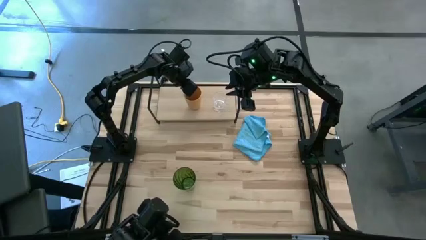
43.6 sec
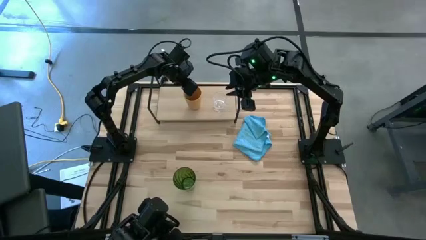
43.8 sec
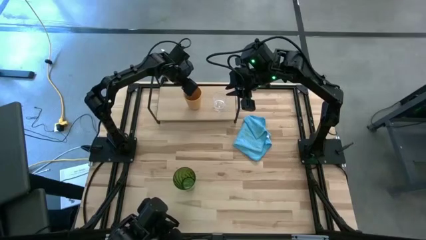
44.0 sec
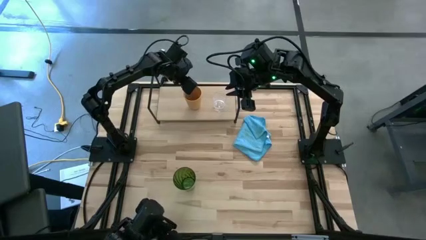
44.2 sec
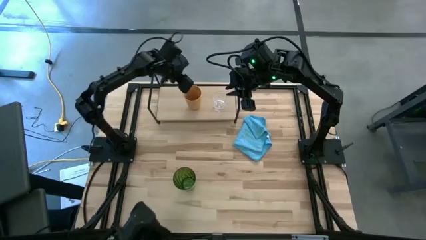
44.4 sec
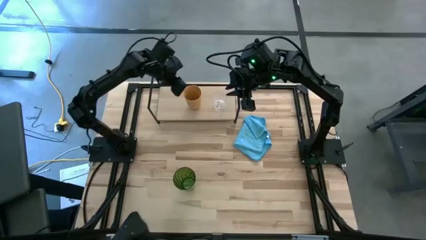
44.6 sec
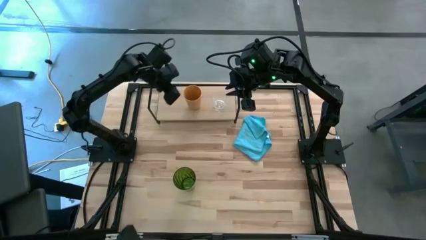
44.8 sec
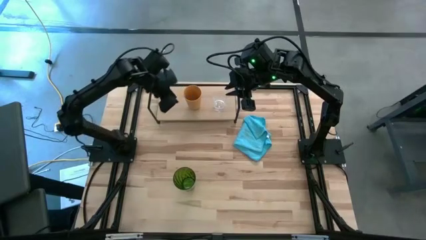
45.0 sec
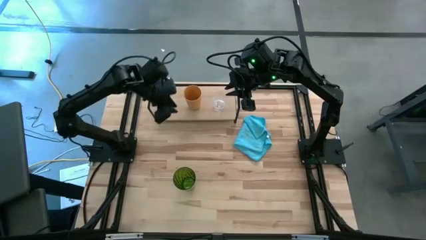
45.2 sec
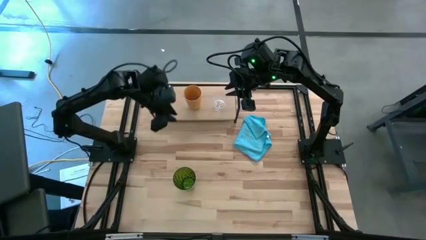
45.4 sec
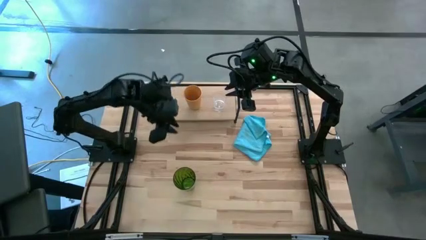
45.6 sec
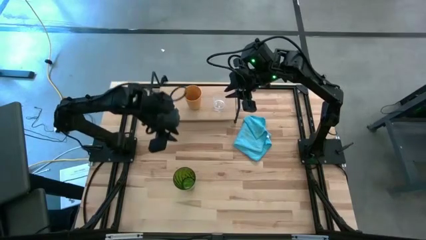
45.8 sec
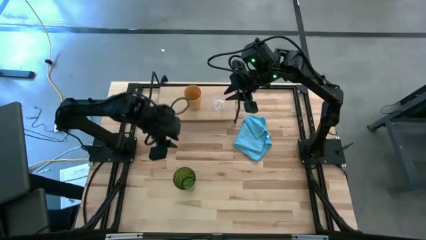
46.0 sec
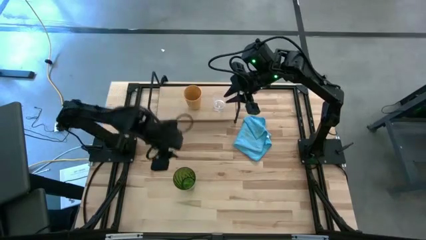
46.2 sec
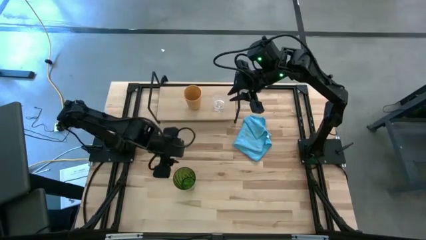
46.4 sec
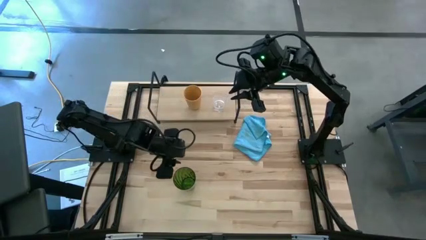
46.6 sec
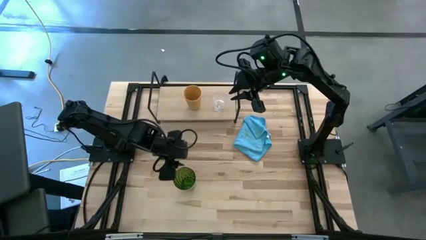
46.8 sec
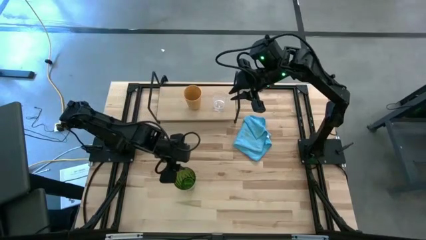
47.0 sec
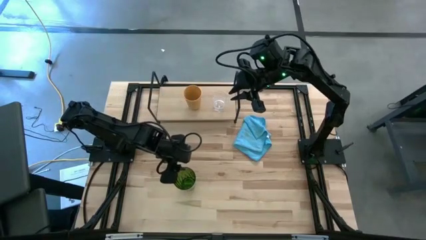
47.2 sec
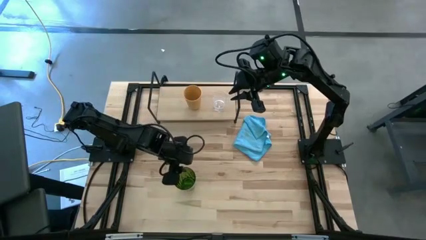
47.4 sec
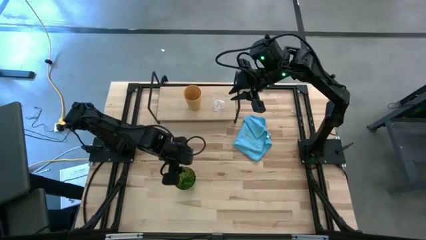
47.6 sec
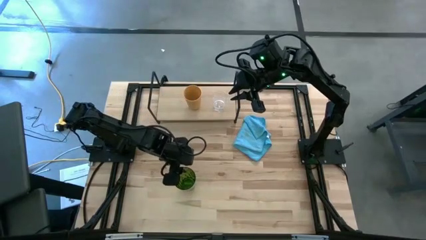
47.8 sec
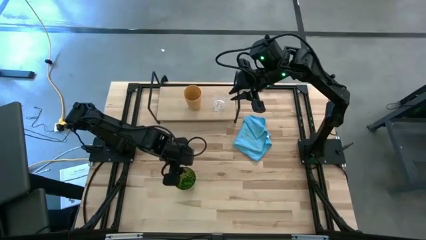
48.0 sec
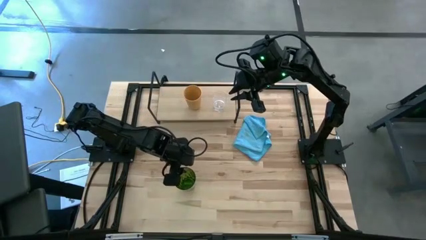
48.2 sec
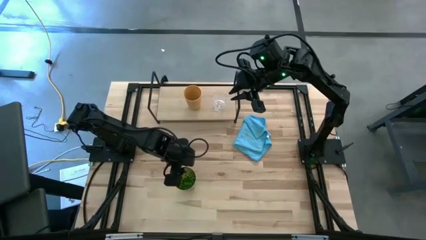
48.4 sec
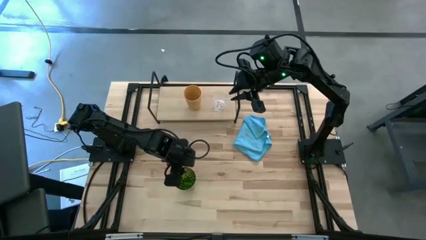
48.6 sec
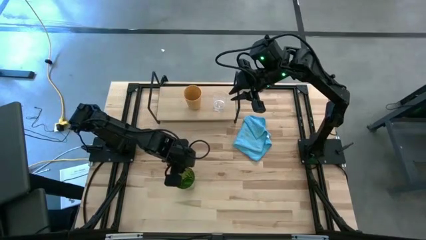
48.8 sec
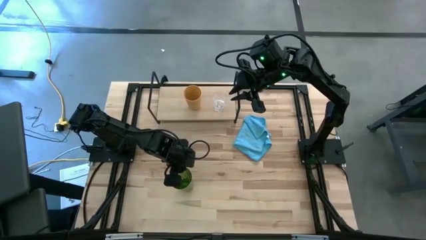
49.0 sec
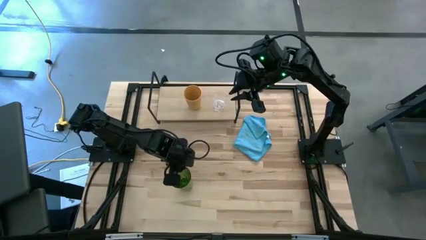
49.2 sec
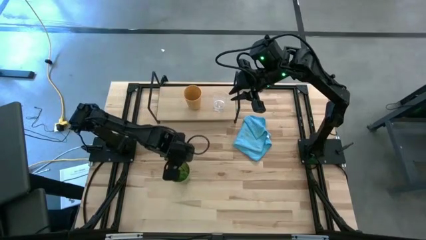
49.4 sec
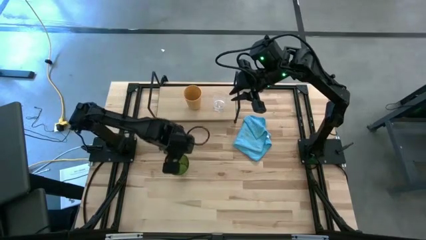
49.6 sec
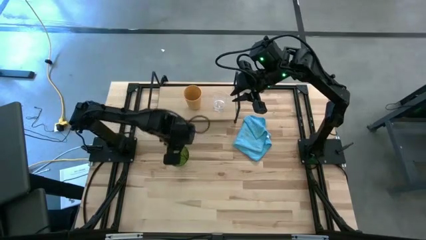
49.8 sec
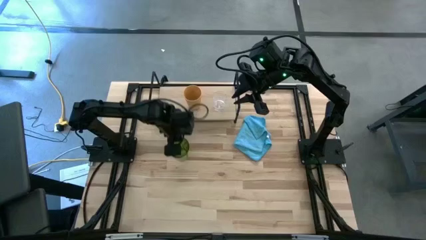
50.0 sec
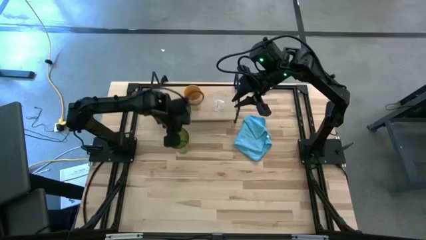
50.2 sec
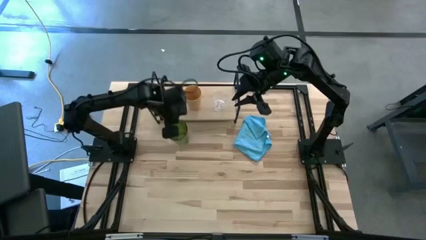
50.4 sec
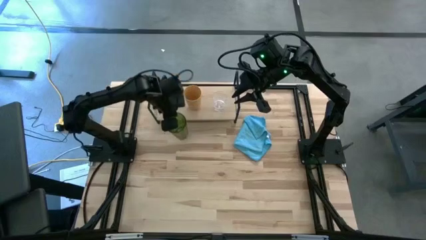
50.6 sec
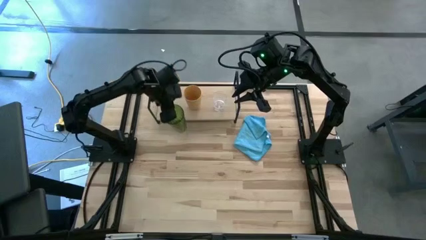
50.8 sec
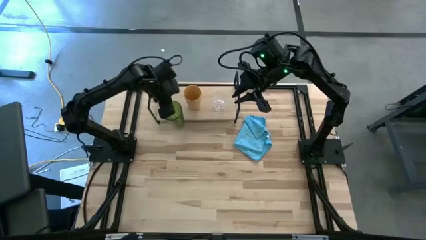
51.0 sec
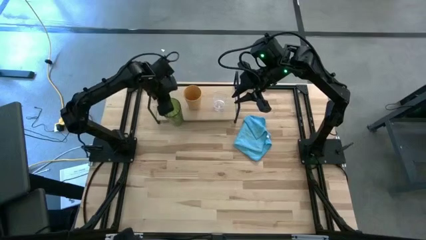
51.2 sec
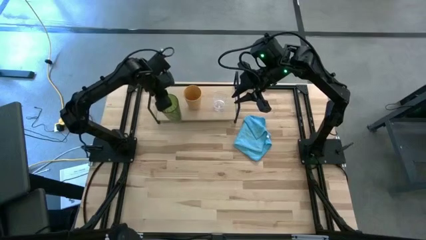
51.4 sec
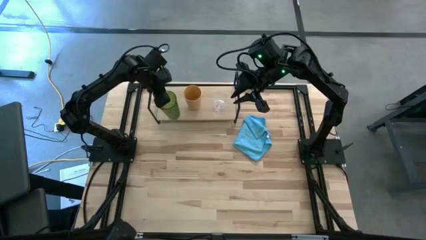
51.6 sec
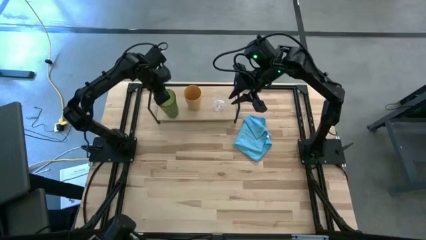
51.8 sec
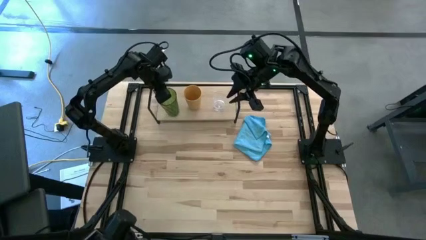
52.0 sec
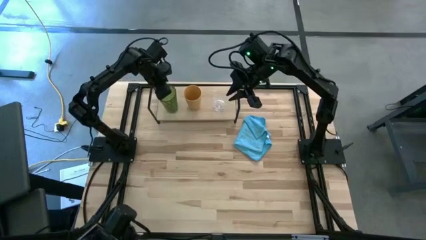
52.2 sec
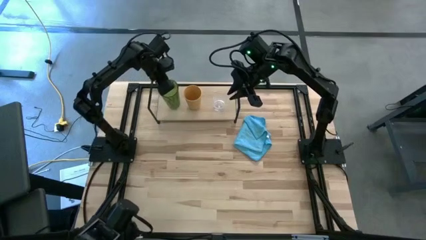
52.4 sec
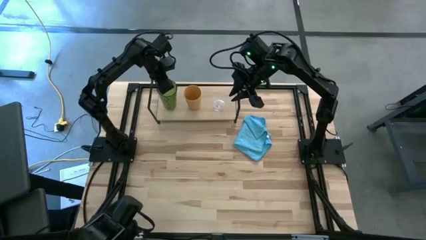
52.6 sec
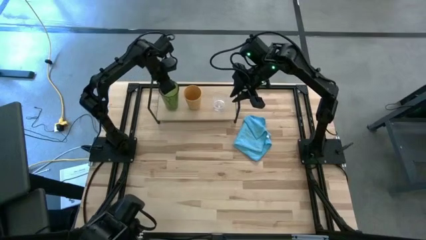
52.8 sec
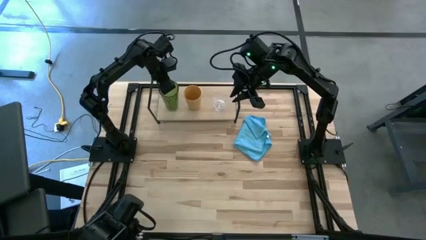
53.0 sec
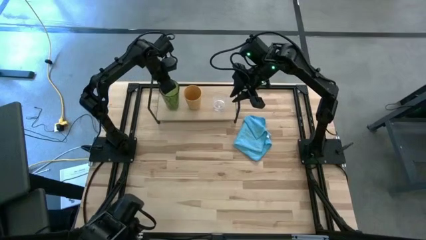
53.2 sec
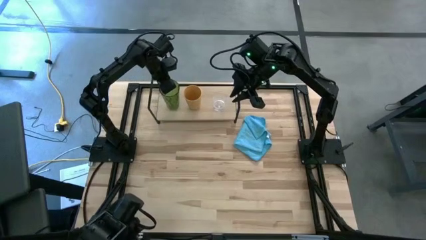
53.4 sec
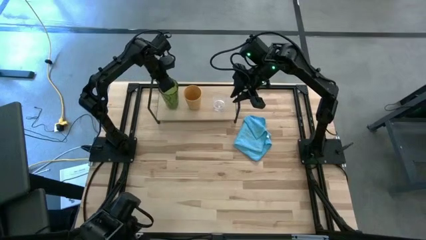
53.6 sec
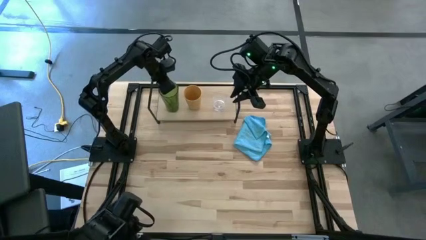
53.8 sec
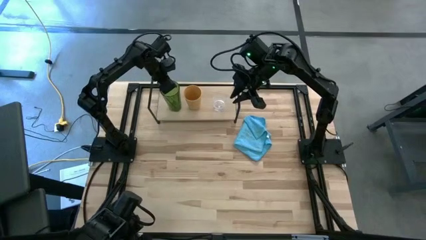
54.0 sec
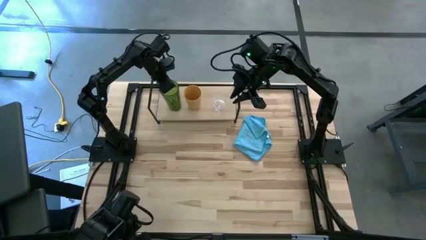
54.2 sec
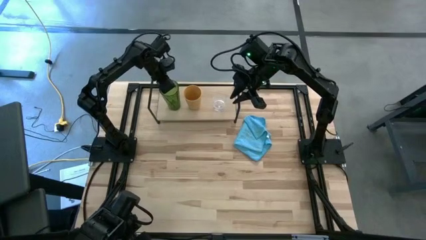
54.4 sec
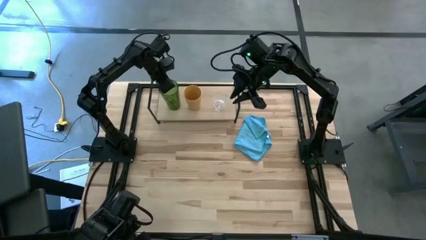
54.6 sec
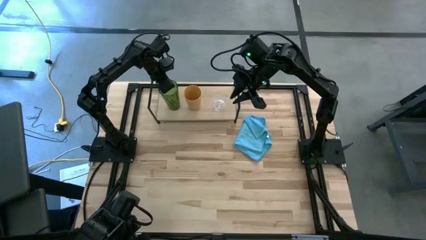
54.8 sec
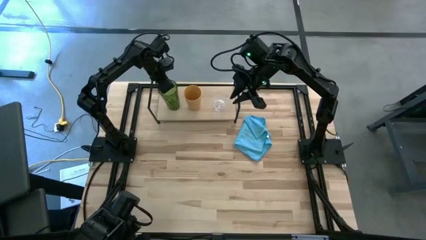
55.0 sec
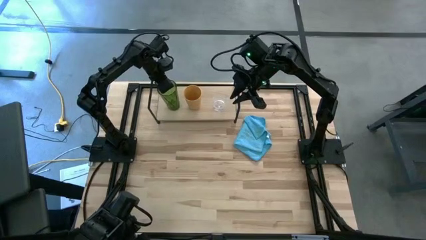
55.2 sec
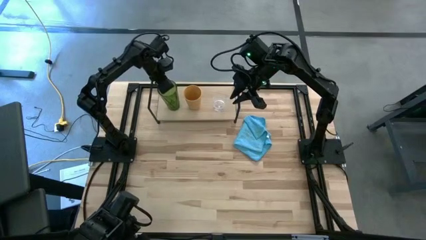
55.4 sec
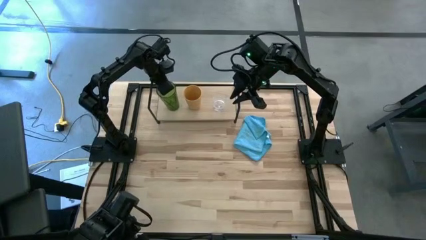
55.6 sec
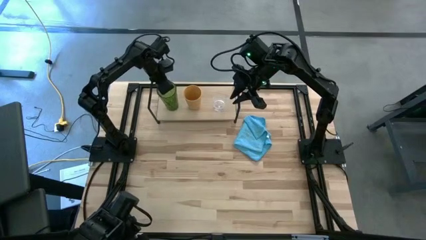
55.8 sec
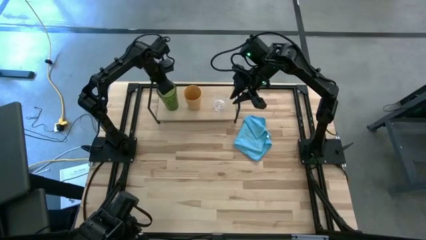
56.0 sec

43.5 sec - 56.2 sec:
Task: Stack small to large cups/mugs on shelf
Put the green cup on the shelf

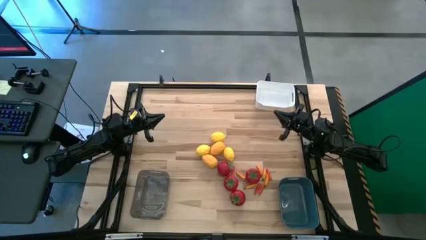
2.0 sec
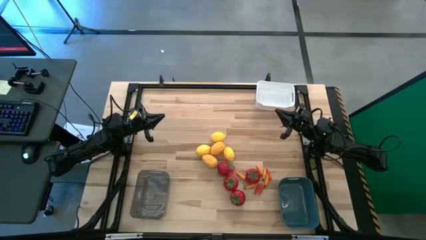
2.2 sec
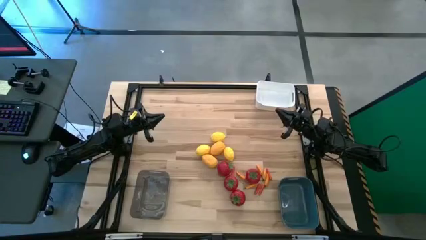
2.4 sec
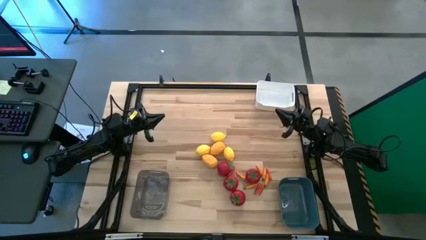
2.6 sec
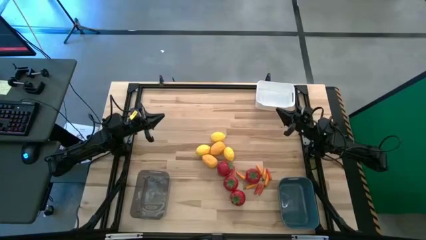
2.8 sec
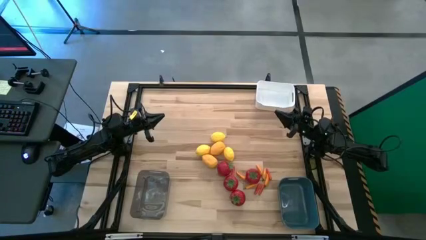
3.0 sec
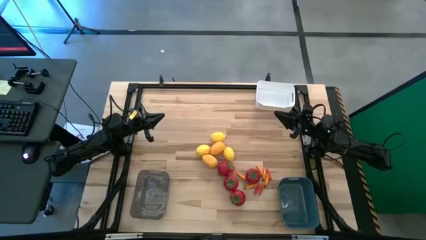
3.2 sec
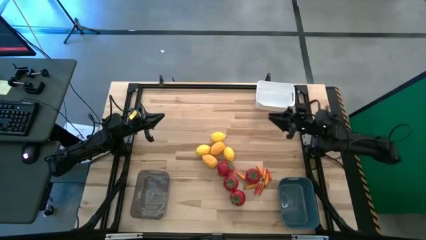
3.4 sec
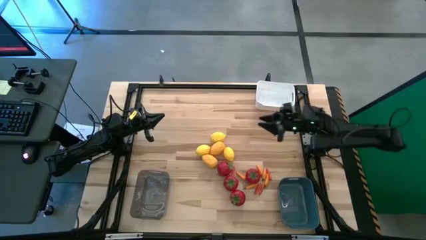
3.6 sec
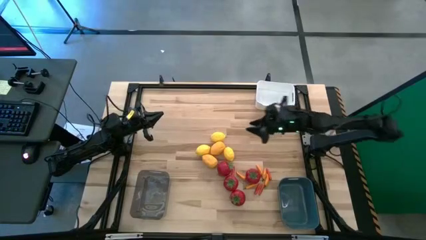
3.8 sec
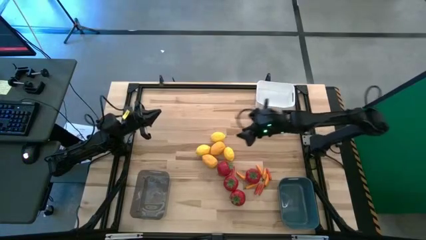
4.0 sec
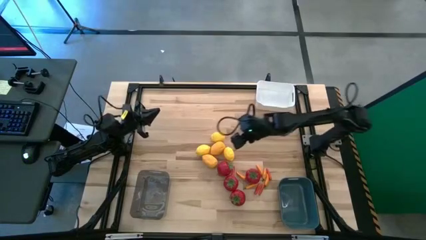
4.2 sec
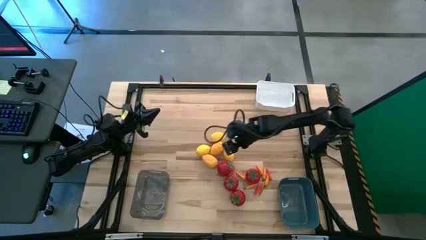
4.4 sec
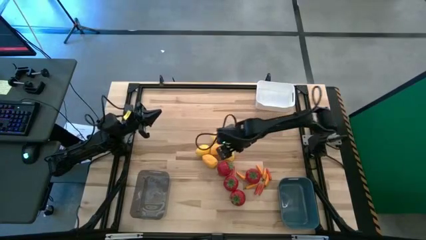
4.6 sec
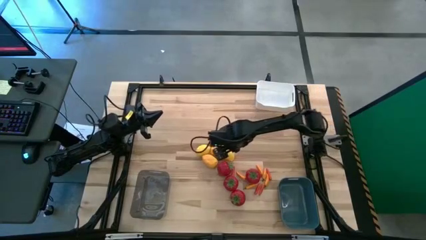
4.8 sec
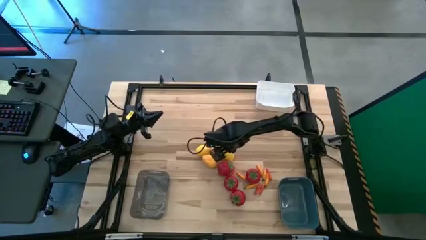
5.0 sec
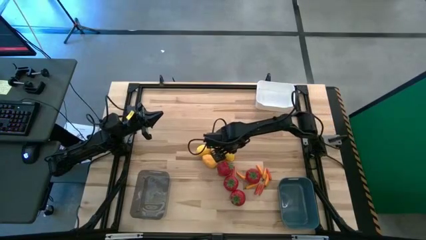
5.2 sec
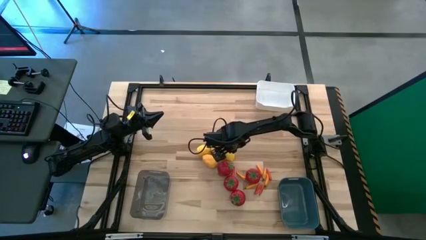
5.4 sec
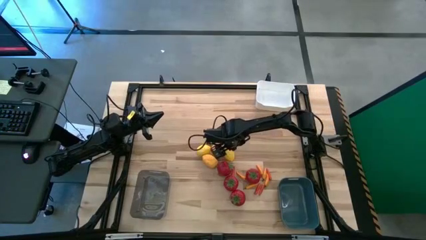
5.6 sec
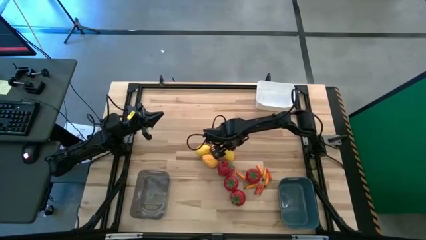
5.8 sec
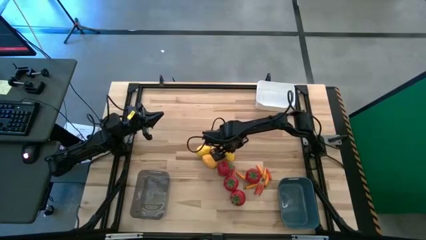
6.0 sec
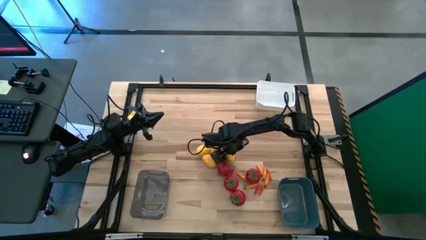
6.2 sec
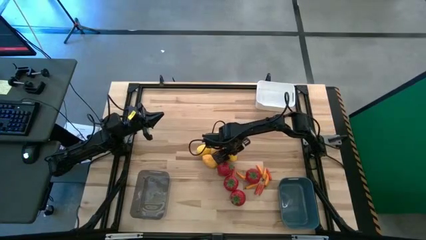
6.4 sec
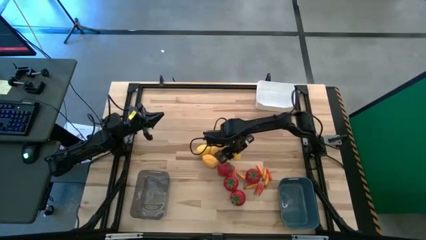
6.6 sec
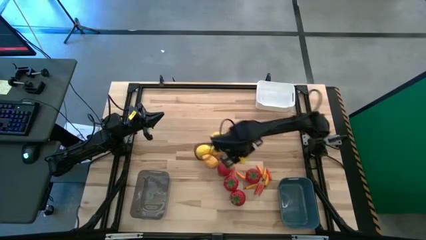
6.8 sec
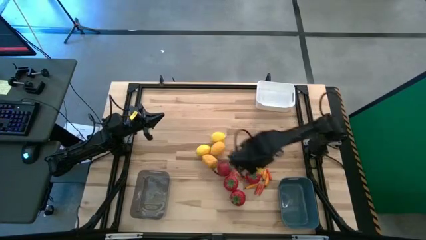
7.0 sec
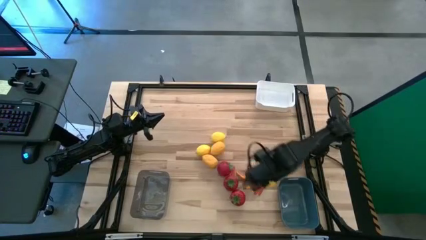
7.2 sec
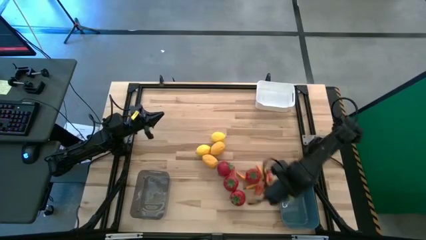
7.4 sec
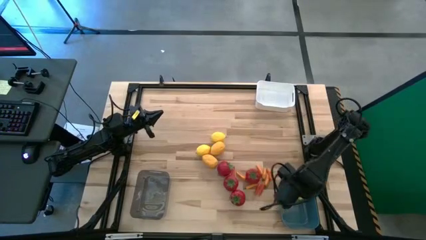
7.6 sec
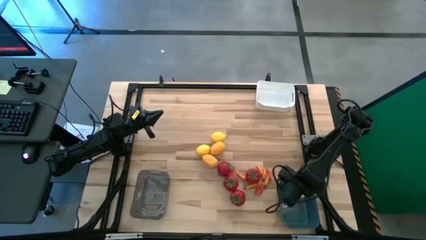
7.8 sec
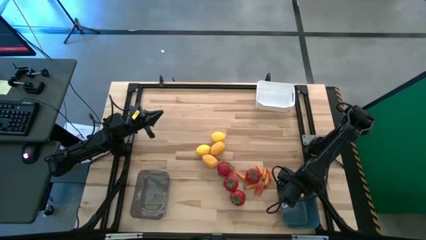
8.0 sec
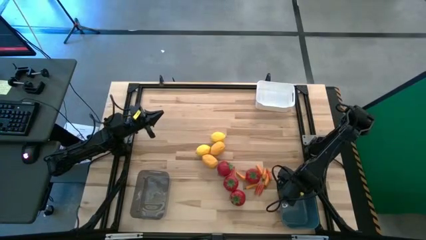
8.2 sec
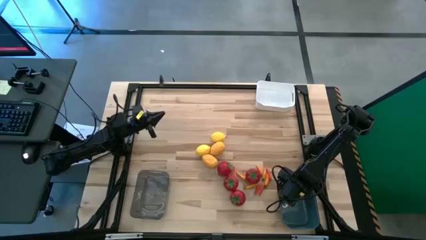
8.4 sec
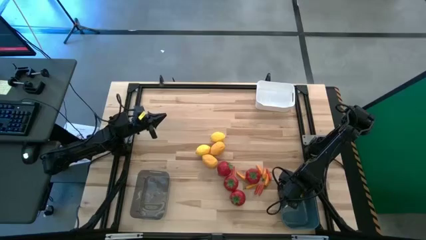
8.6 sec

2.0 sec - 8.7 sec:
Task: Sort produce into baskets
Put the lemon into the blue bin
